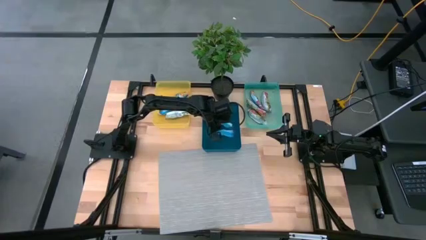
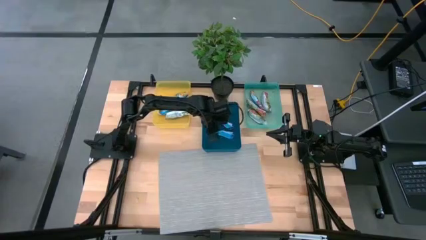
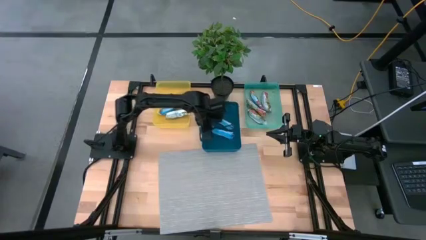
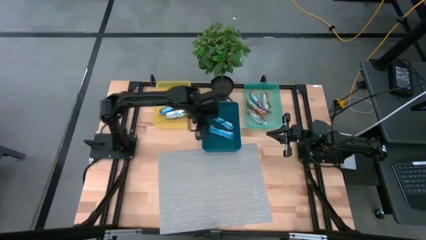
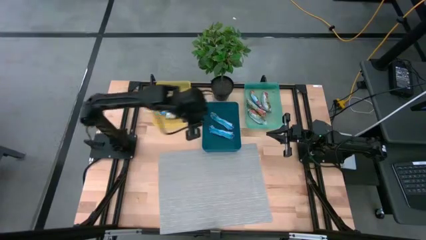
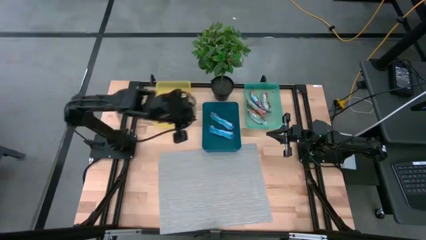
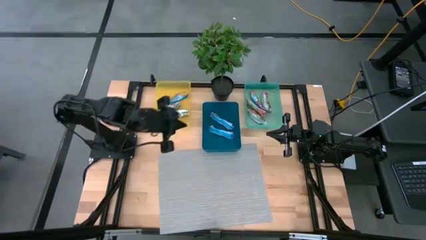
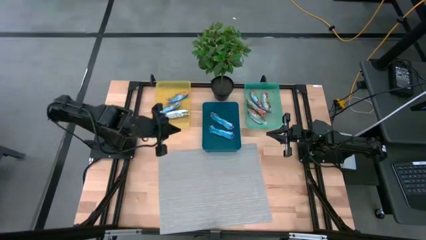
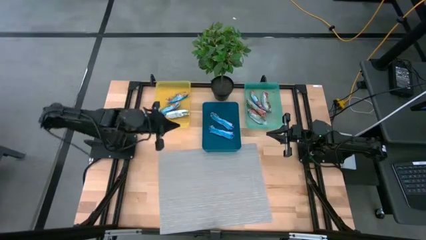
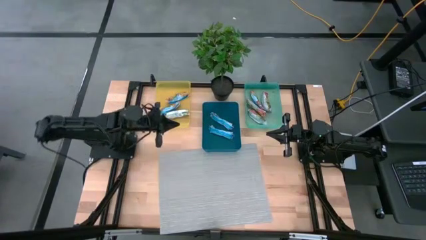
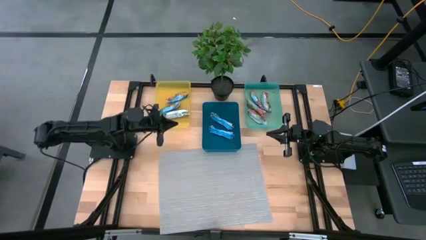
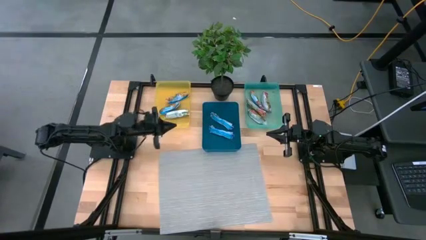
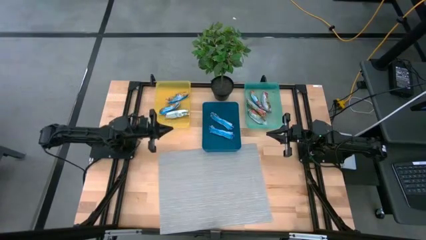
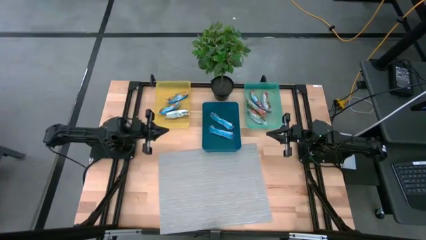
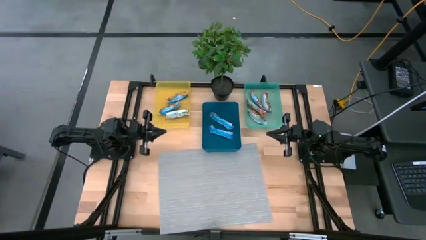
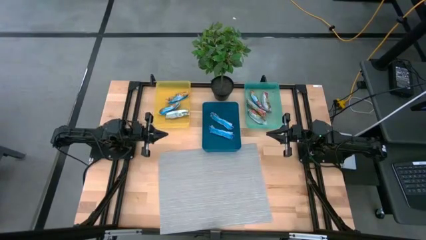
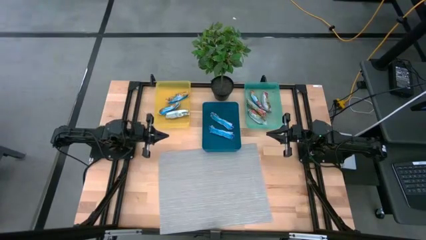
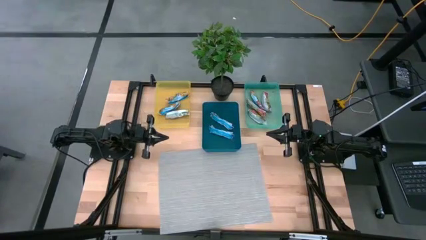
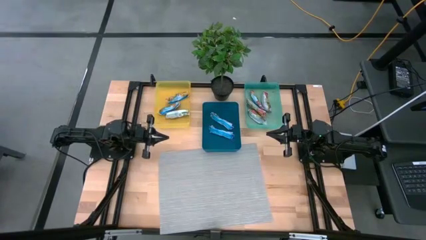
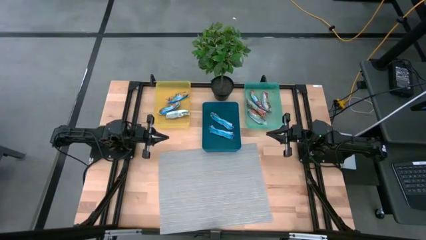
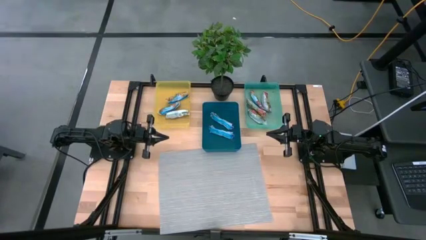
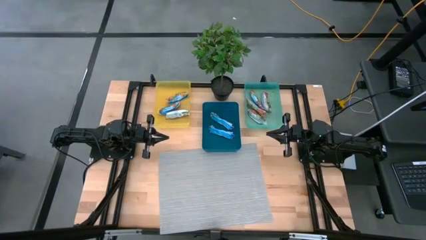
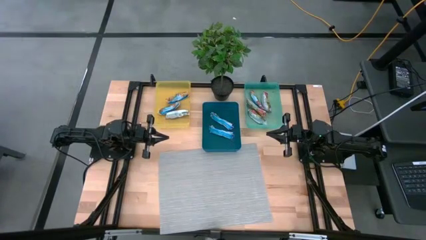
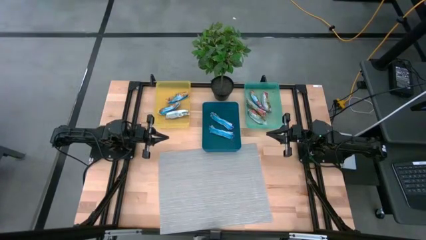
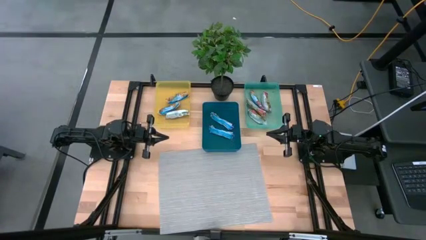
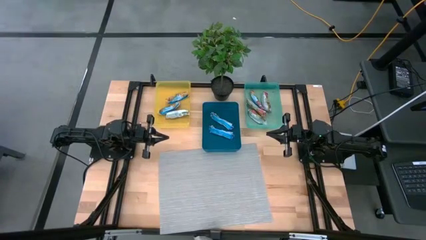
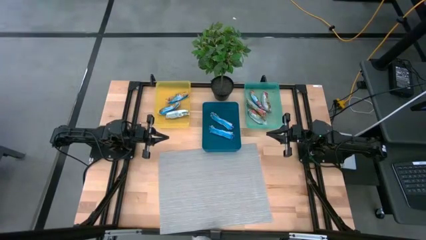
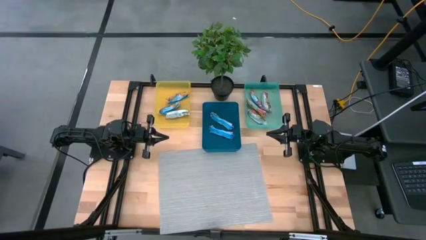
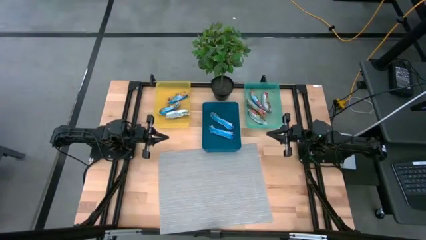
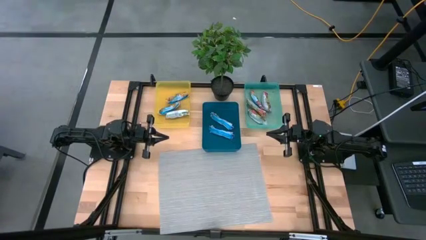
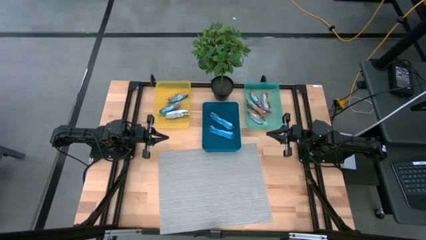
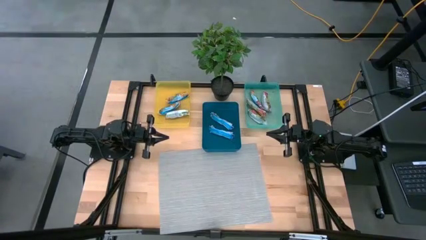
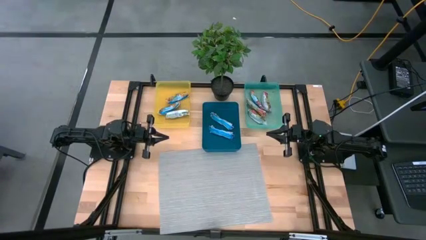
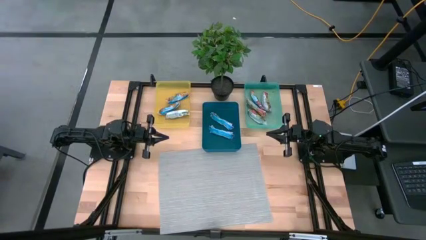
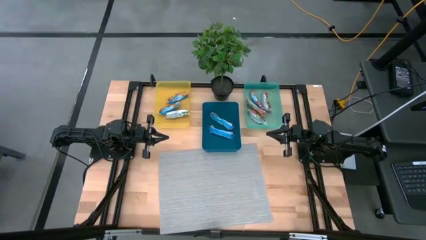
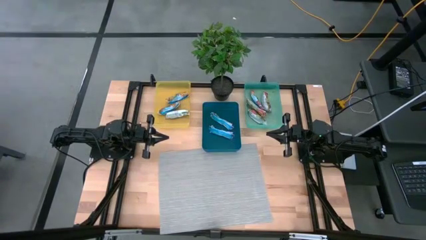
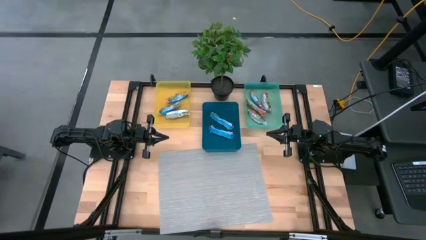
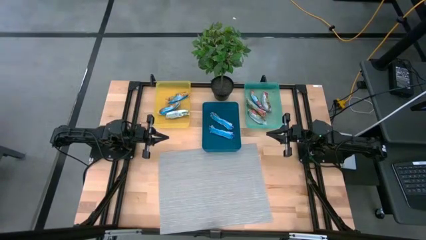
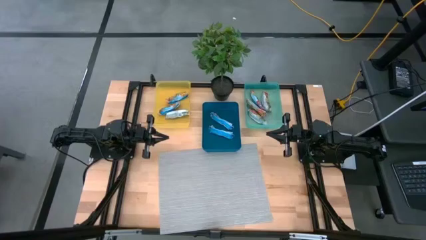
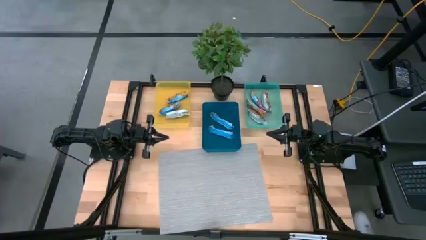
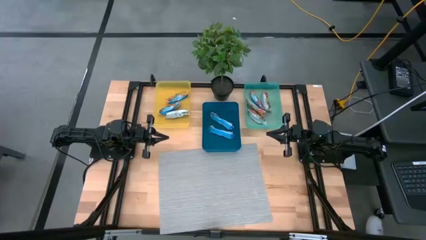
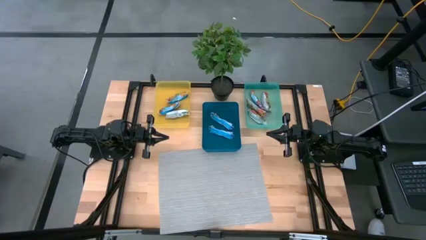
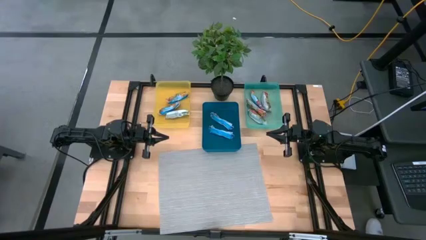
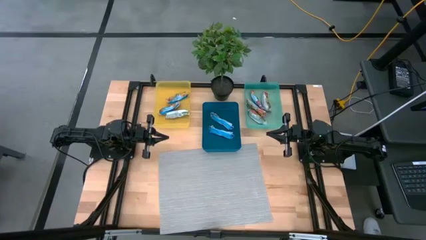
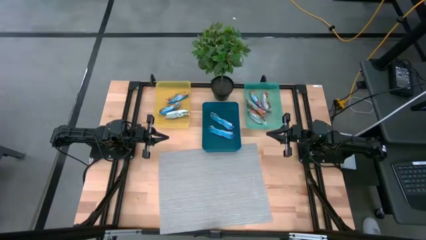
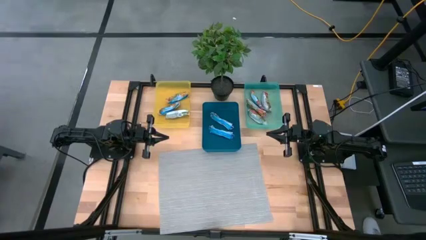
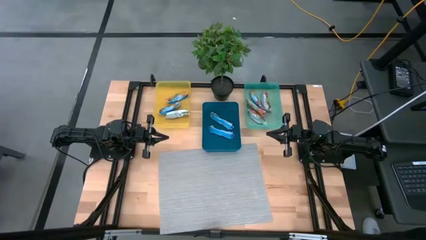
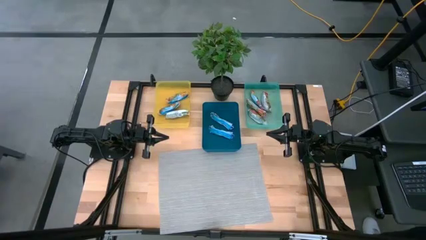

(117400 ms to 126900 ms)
Task: Pick and place Granola Bars by type
Return to Home Position

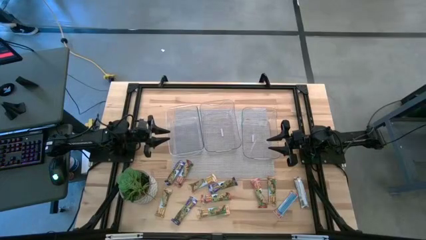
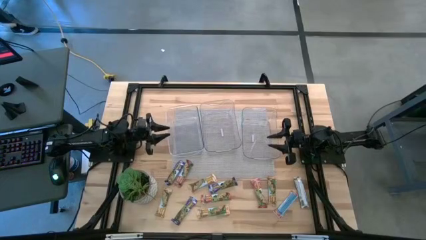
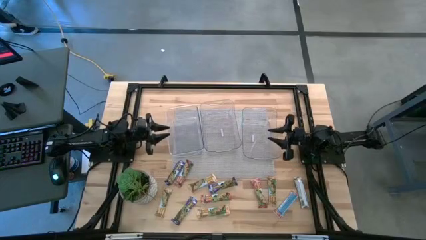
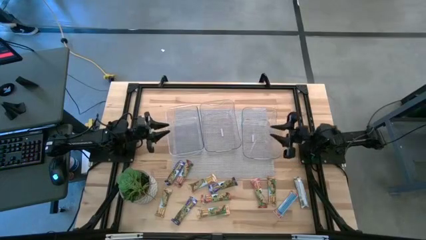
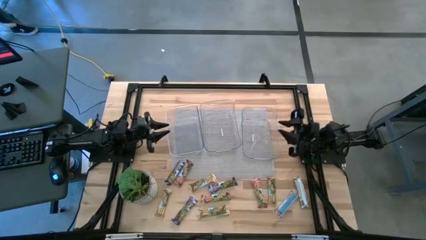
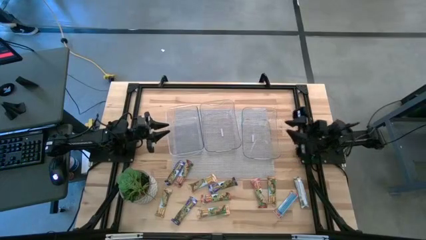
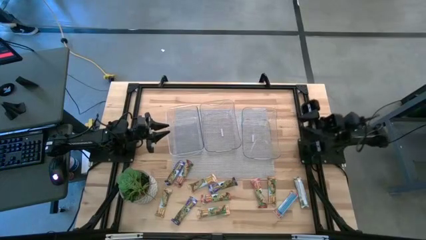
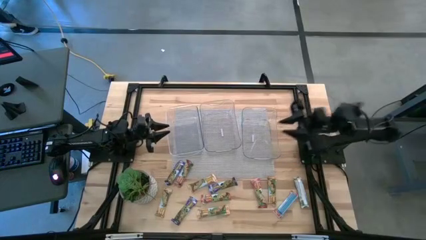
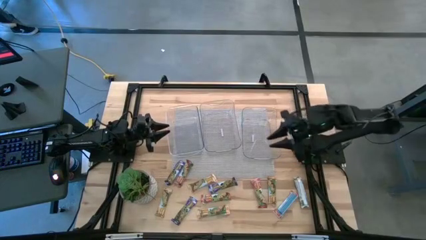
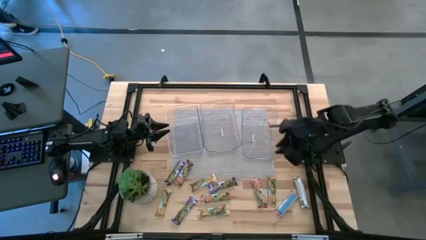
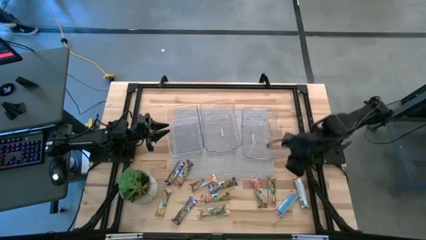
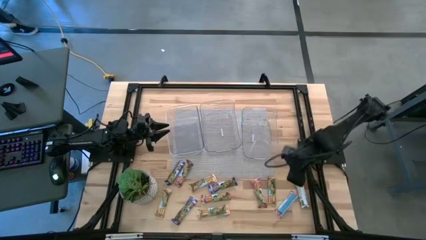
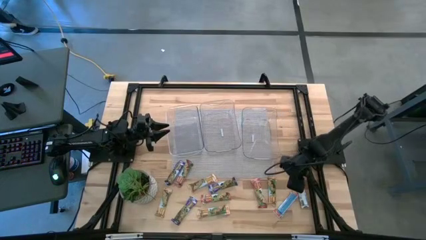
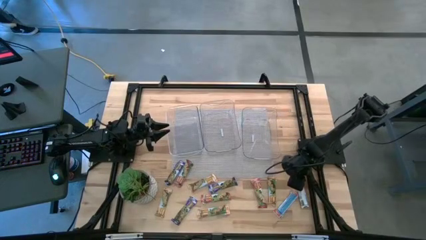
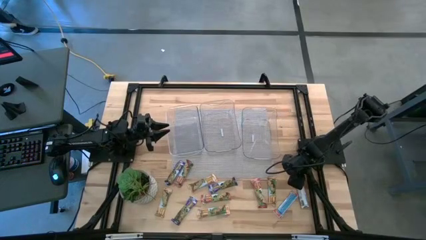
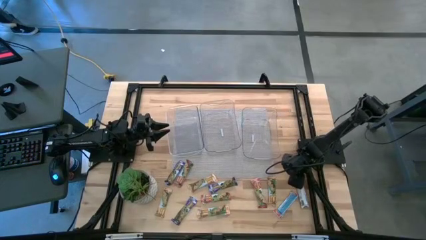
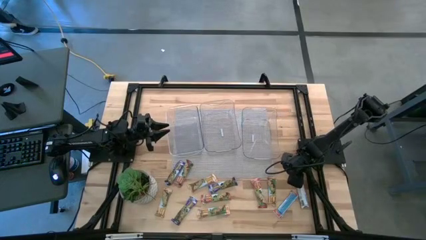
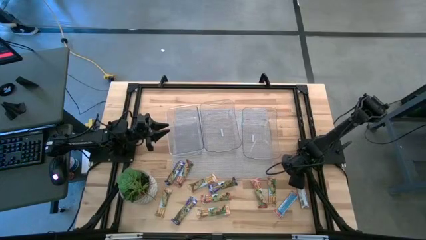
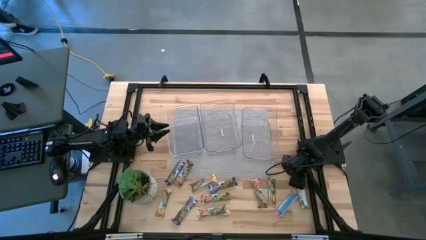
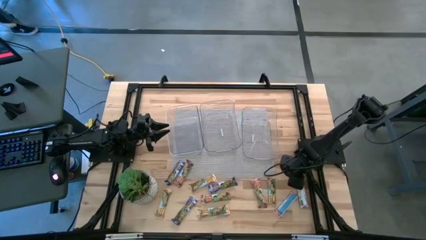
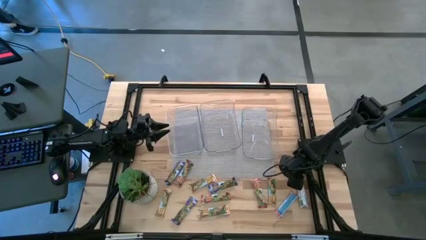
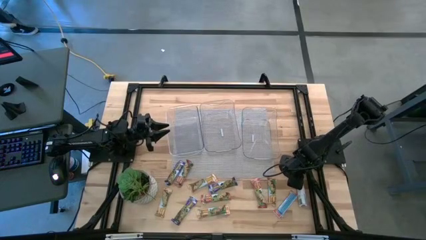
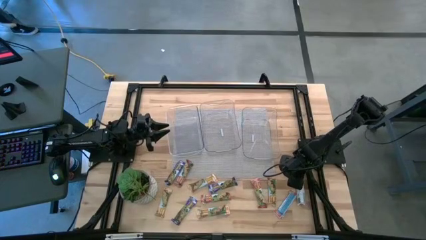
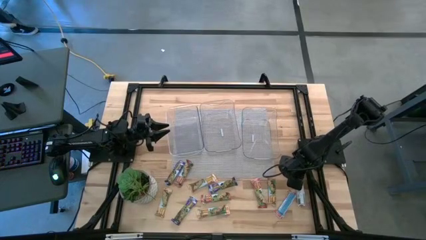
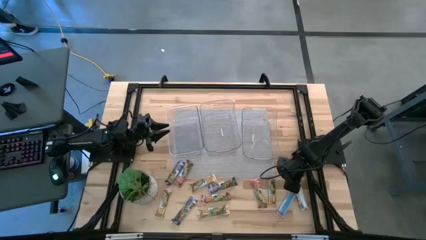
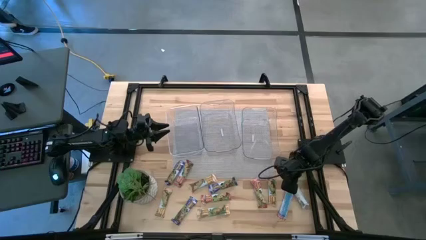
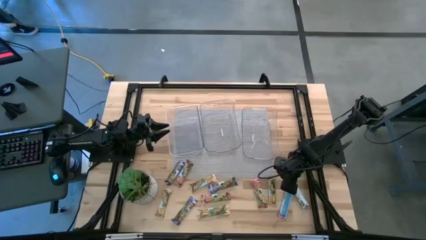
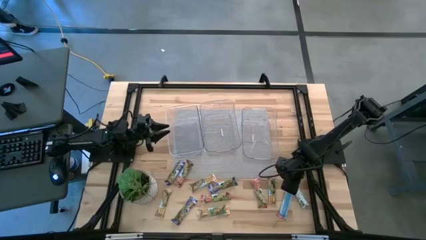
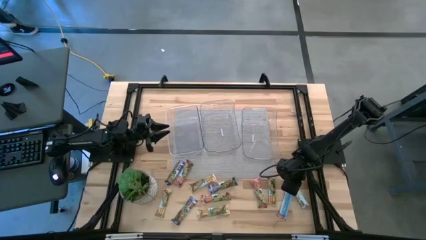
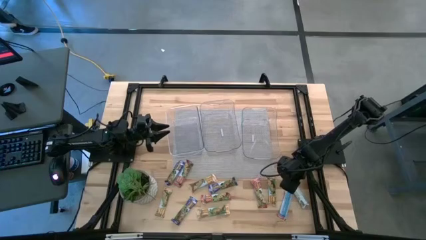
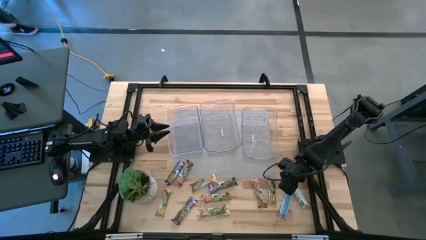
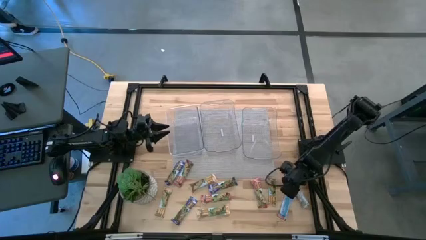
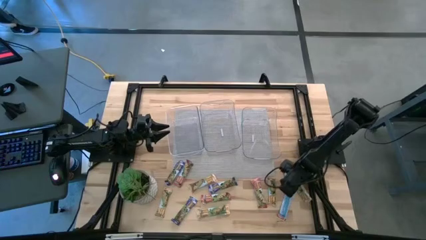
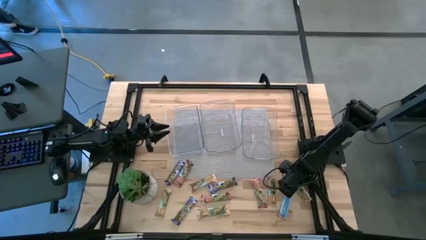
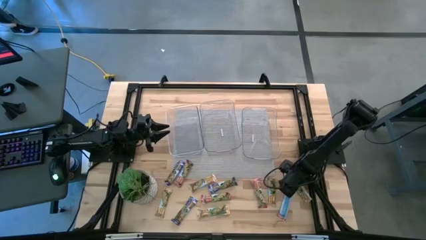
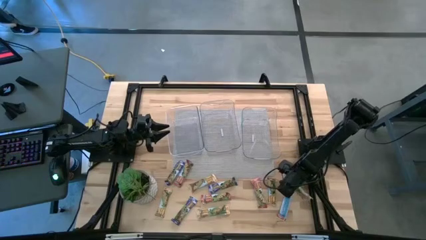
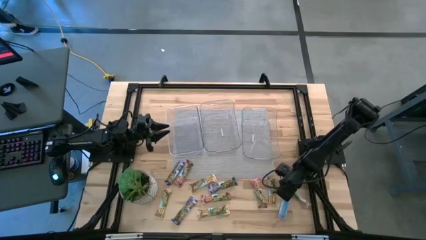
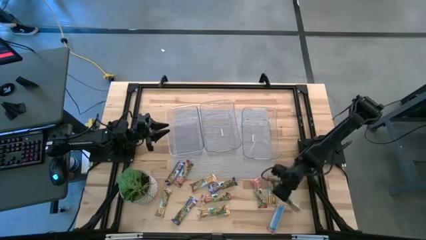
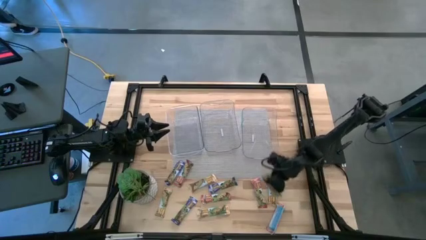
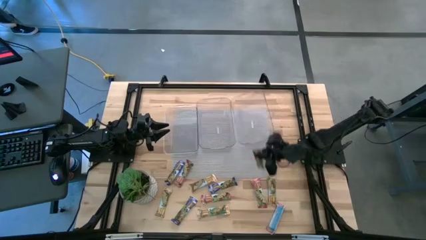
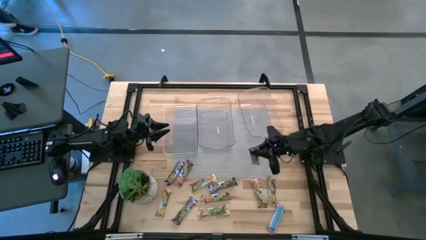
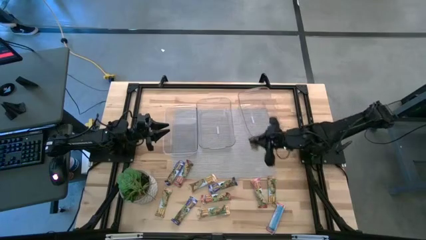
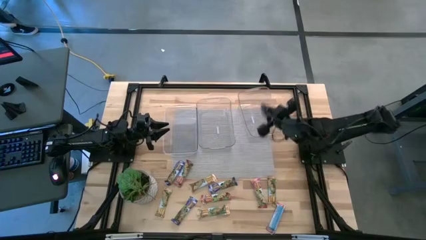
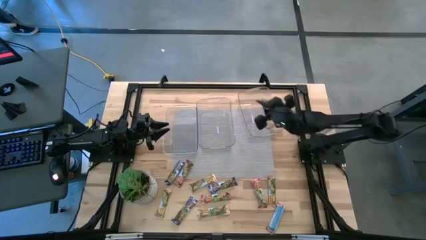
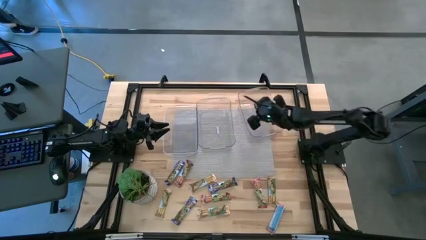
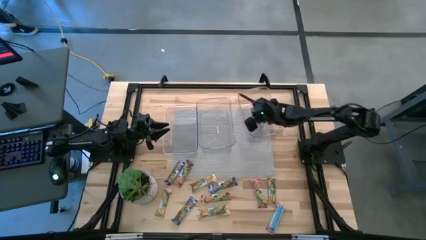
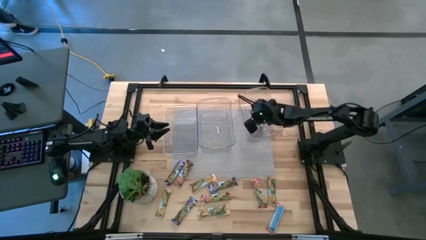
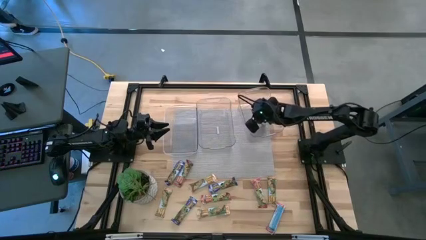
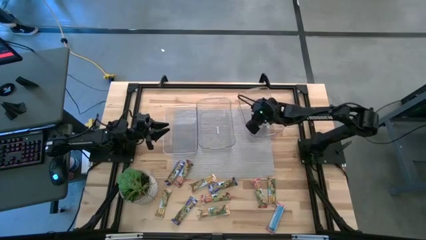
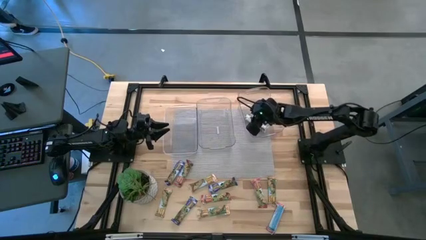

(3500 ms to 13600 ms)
Task: Pick and place Granola Bars by type
Put the orange granola bar into the right transparent bin
